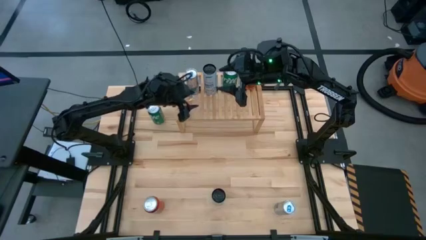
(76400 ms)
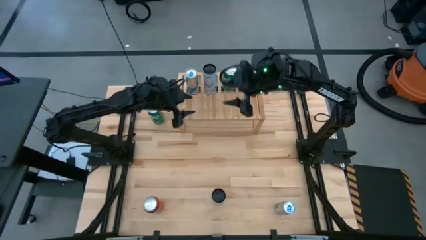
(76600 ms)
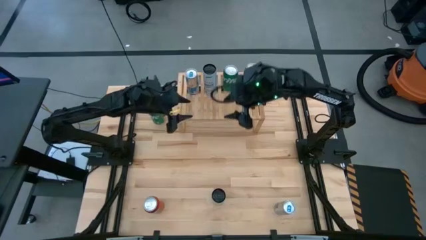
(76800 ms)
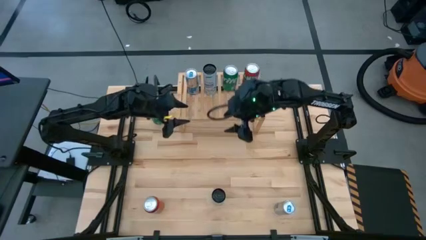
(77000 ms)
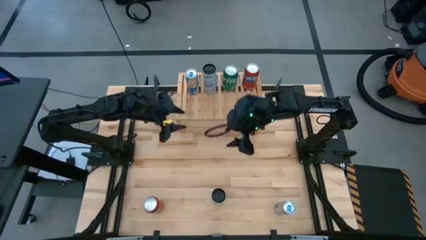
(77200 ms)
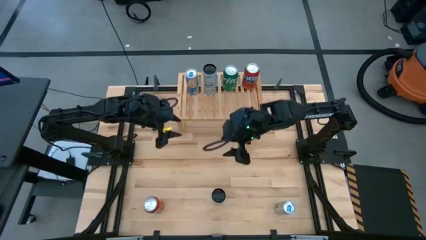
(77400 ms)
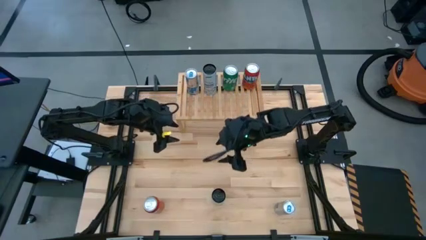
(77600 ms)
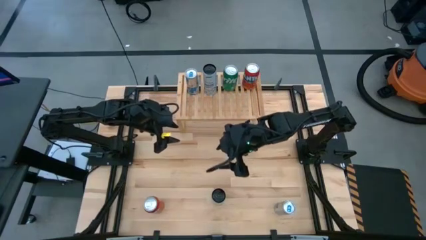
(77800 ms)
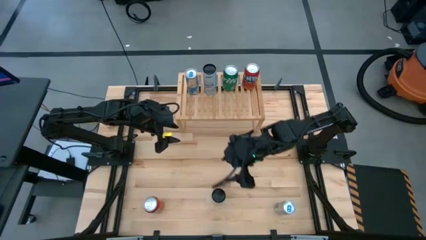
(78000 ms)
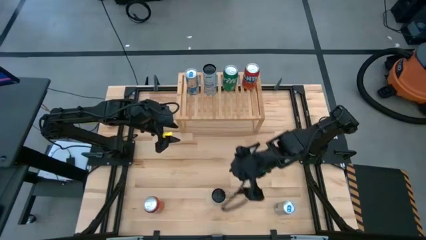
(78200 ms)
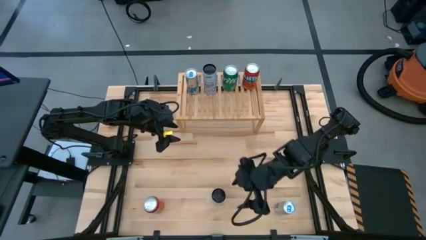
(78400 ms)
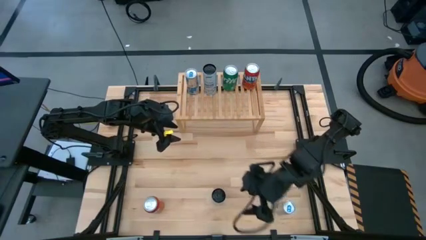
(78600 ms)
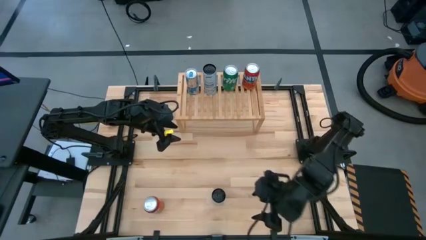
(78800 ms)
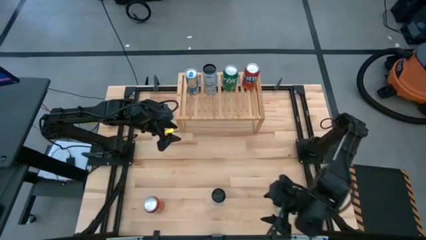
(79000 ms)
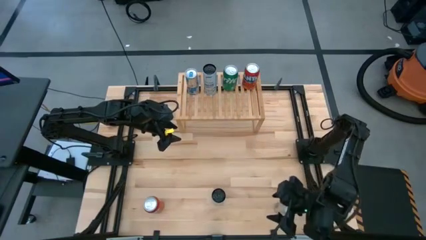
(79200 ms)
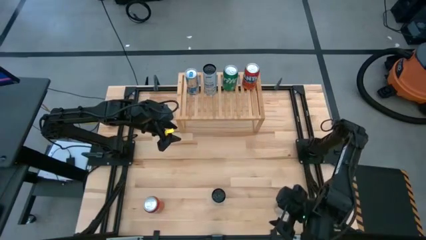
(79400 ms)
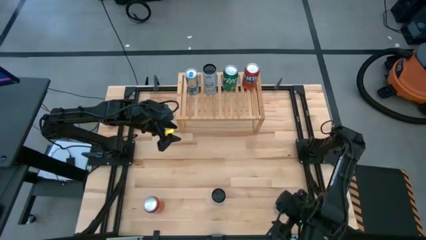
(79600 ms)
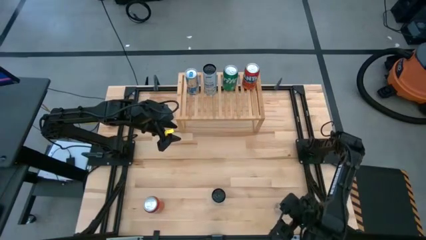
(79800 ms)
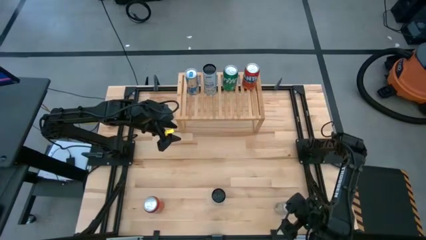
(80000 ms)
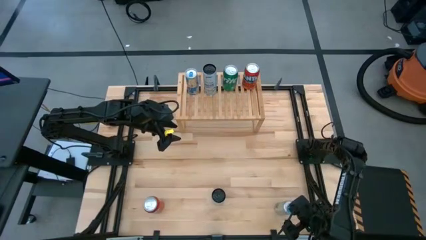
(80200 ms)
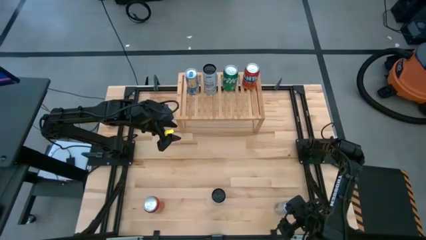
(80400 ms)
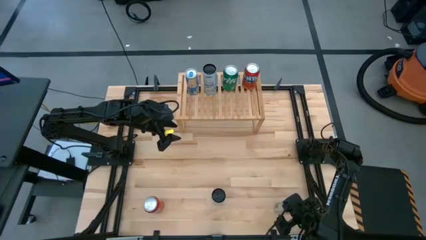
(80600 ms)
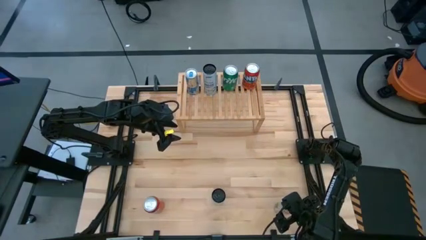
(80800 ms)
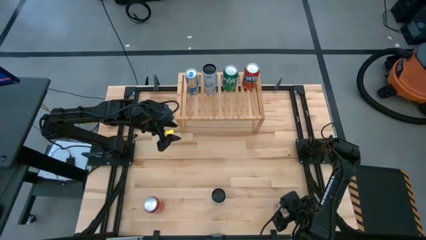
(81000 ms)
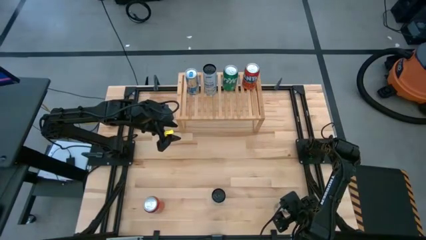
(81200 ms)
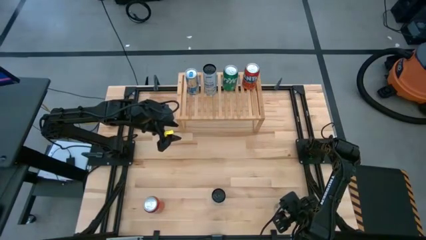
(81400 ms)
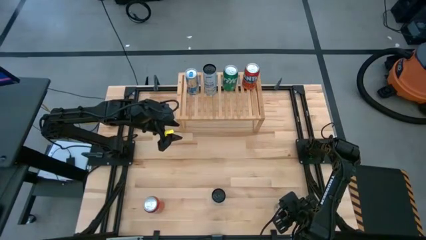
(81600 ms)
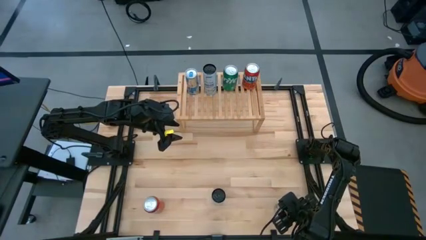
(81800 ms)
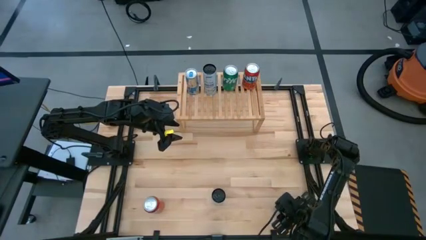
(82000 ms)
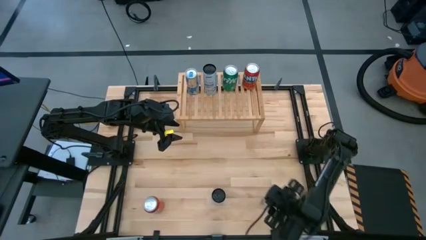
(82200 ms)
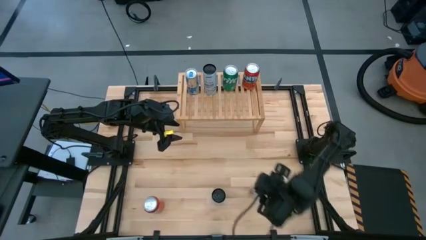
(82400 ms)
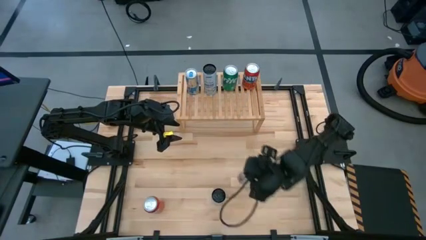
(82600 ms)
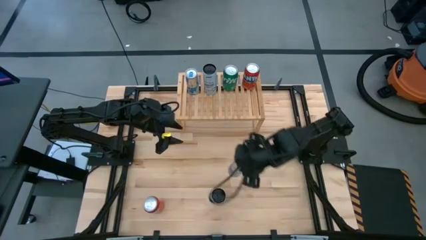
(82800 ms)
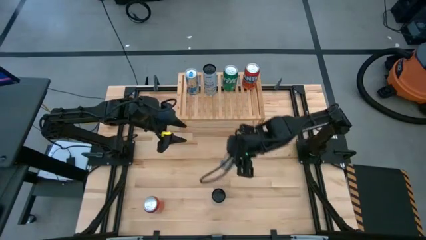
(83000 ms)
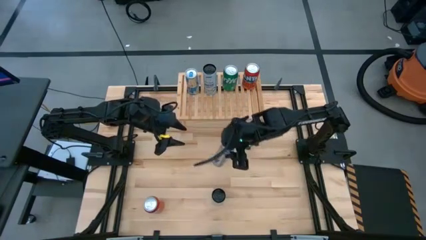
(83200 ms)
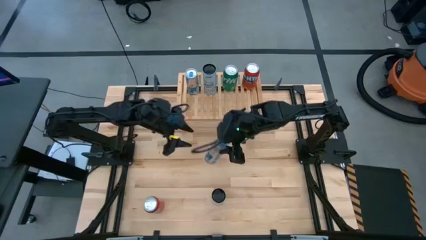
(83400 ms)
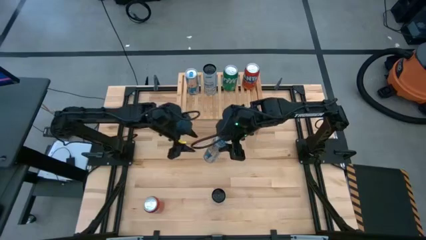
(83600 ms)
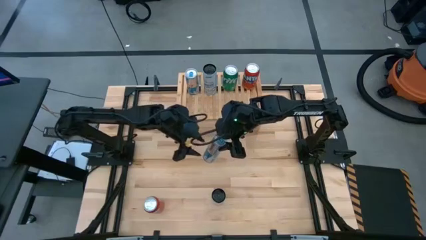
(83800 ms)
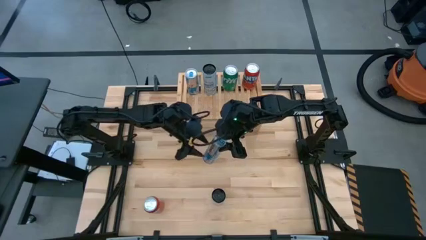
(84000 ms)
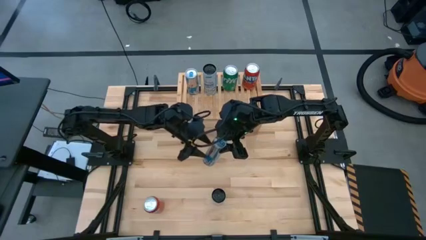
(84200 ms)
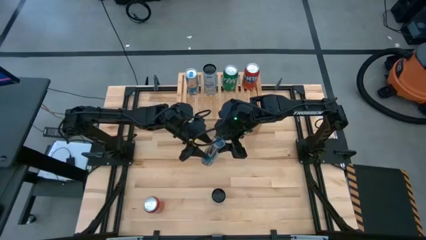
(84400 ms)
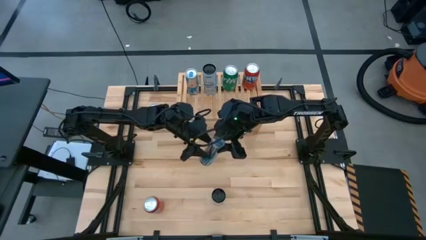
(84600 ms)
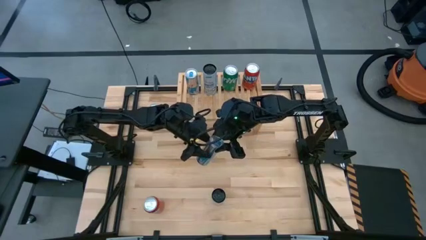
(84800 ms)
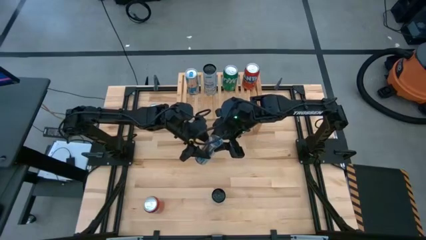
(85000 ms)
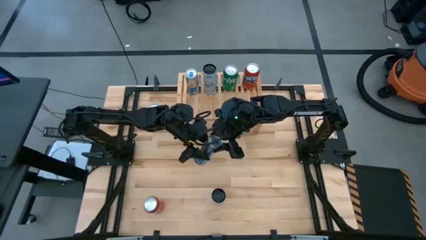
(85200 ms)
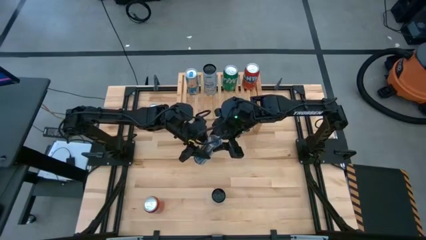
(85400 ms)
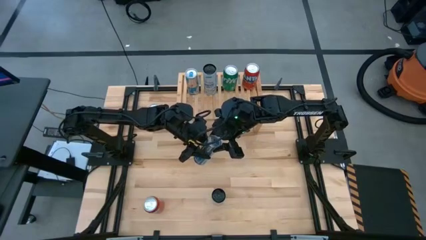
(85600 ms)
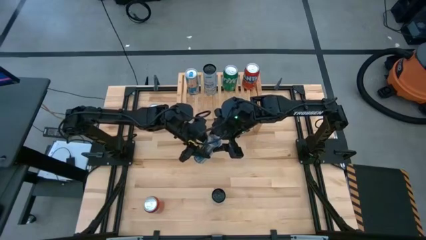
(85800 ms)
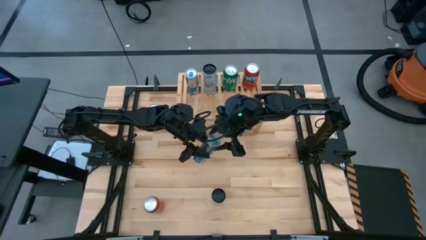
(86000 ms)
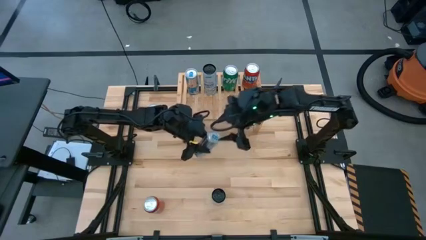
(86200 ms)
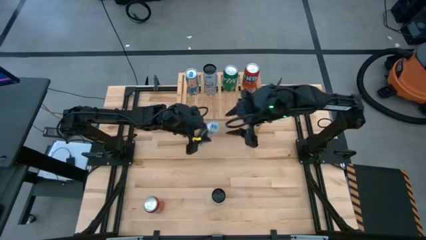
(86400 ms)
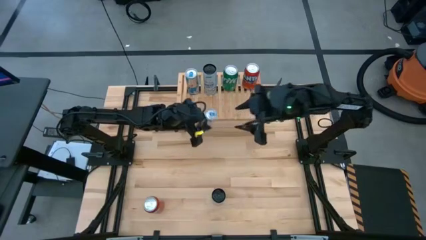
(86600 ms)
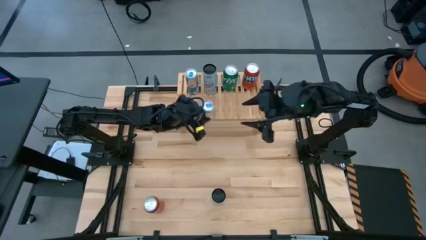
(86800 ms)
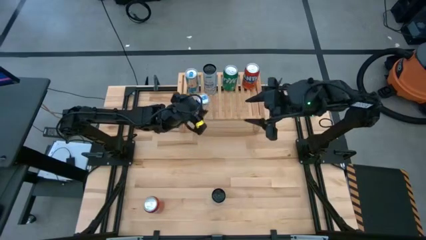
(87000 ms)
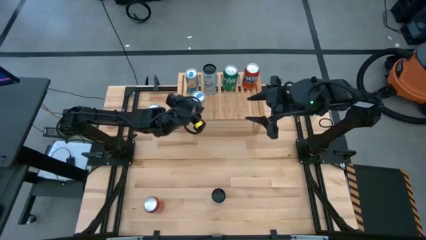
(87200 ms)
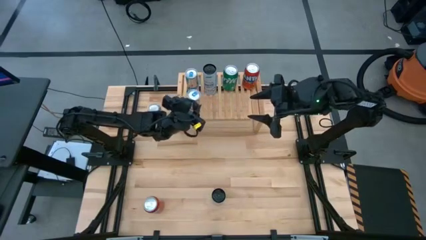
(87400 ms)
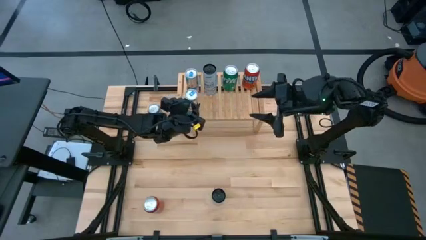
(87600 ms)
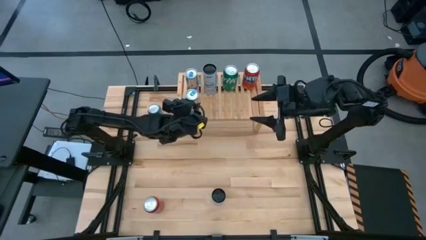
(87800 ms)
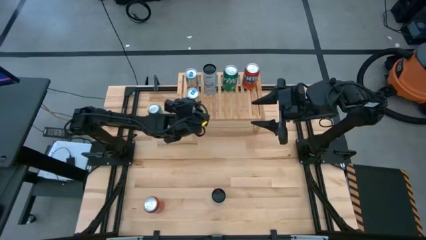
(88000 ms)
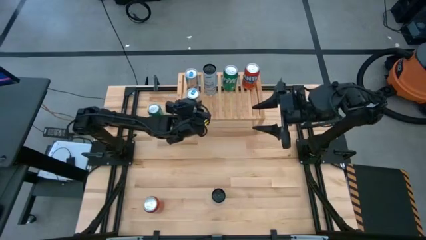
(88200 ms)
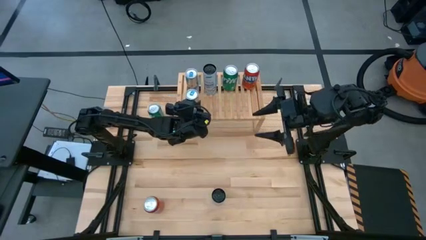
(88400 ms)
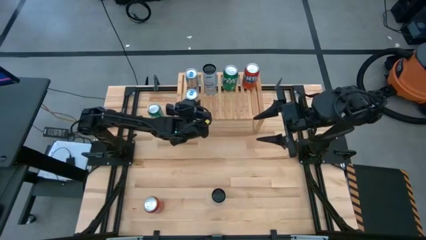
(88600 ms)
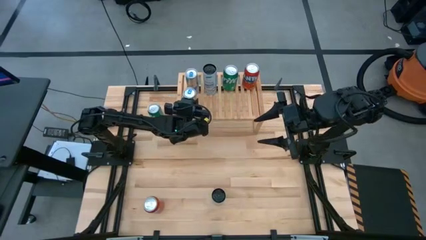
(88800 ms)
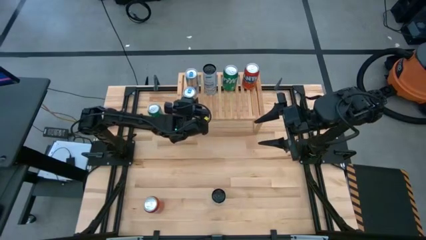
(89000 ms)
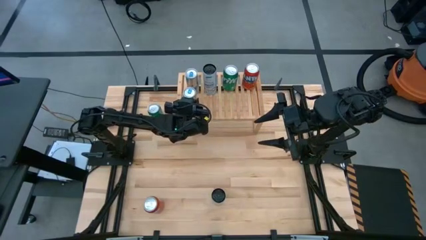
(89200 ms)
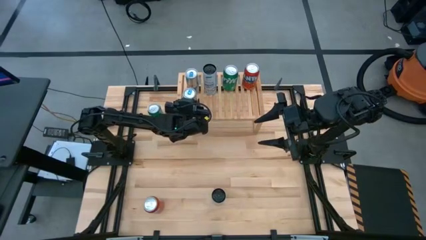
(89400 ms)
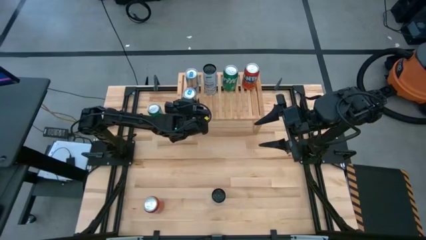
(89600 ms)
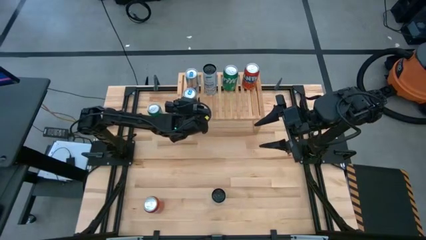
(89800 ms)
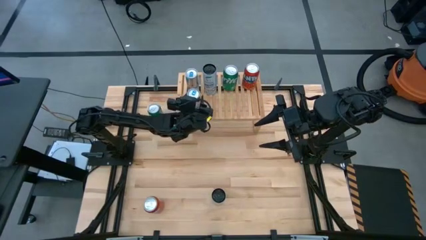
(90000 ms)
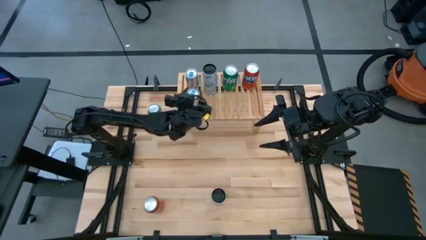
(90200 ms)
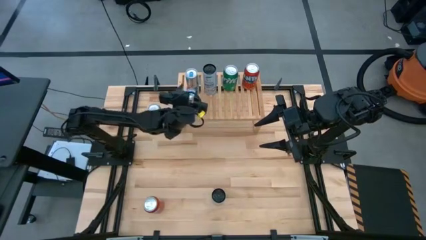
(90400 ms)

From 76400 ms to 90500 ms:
Task: Place canned beverage on shelf
Put the blue soda can aligned with the other blue soda can on the shelf
